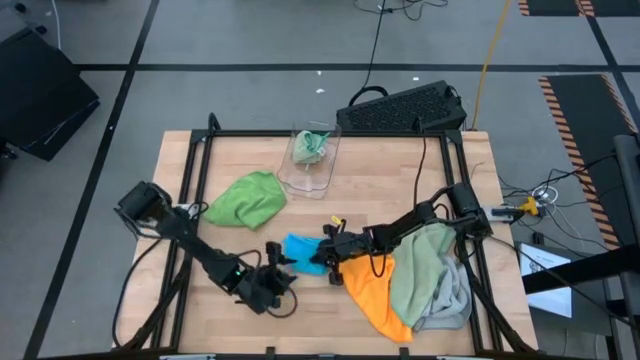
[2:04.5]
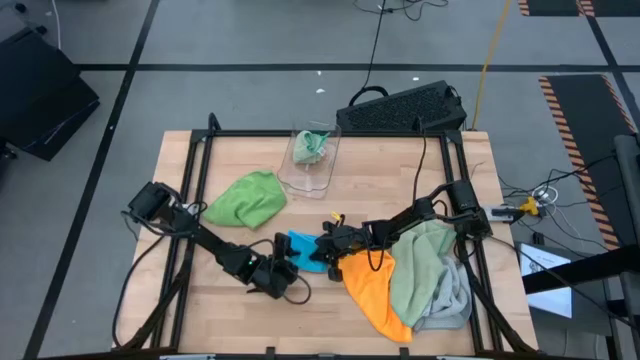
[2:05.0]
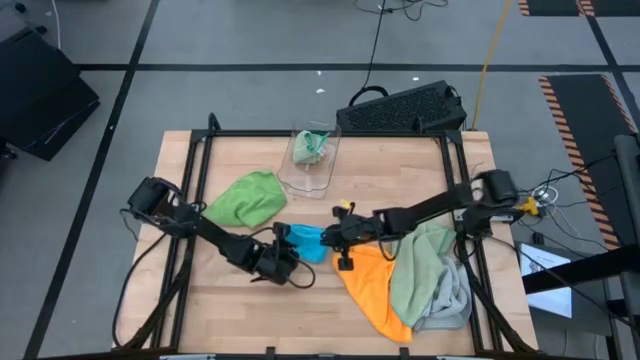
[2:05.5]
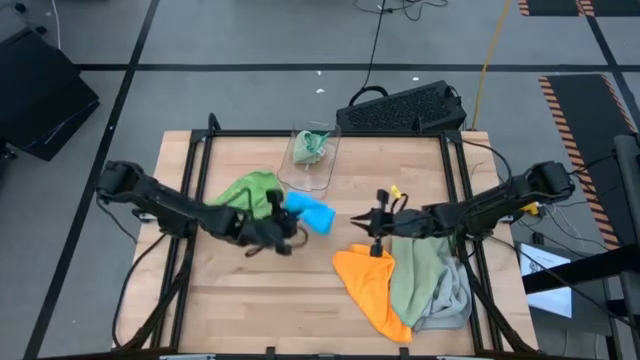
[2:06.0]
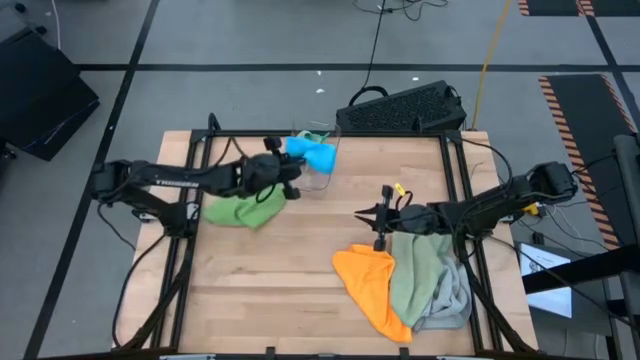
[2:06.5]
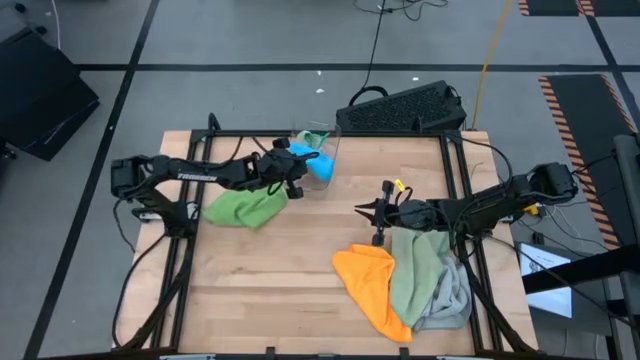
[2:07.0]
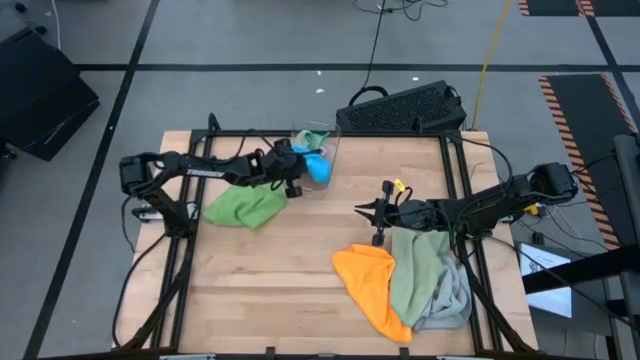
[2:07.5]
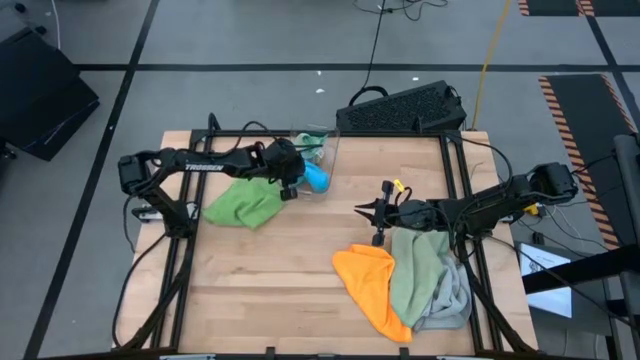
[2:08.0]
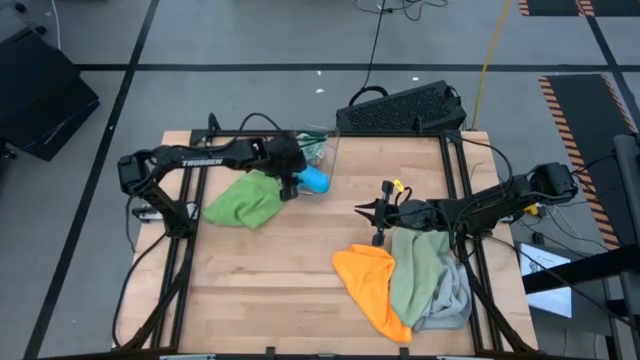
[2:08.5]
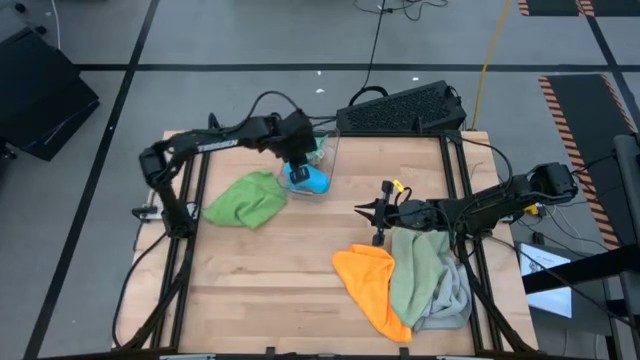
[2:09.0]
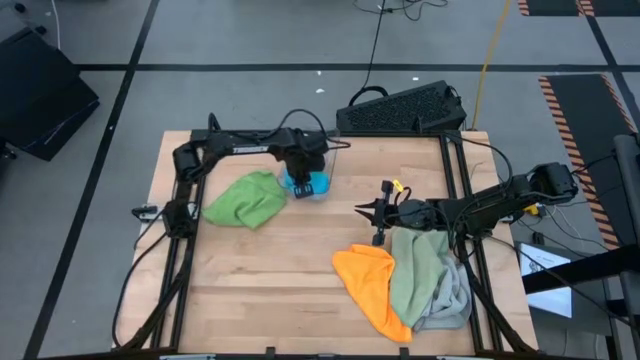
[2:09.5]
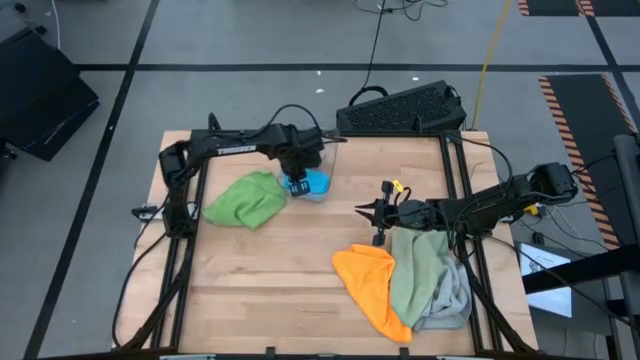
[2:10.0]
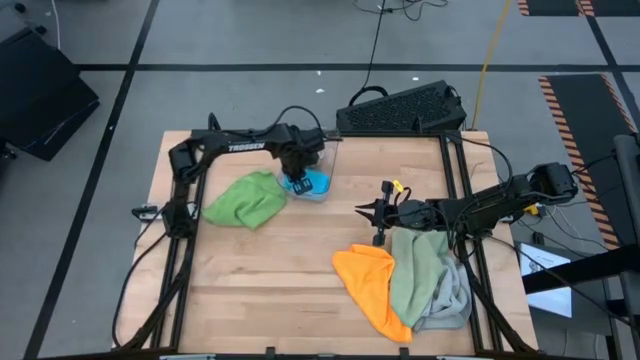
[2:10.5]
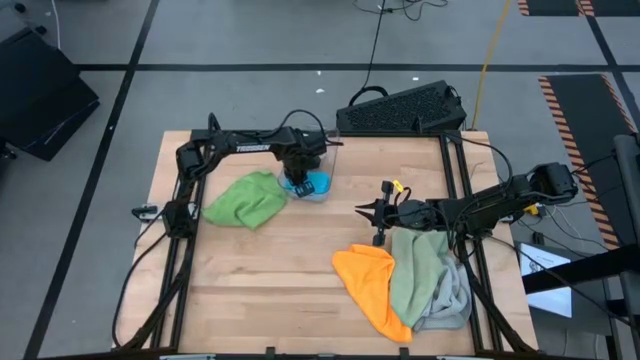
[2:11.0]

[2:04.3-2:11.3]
Task: Fold microfiber towels
Put the folded blue towel into the transparent bin

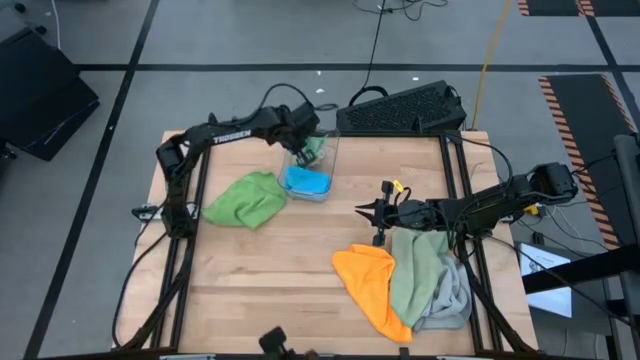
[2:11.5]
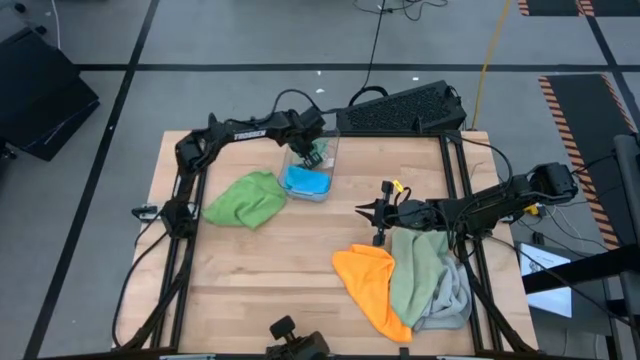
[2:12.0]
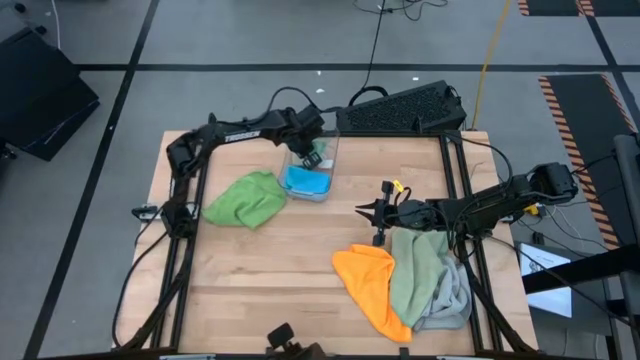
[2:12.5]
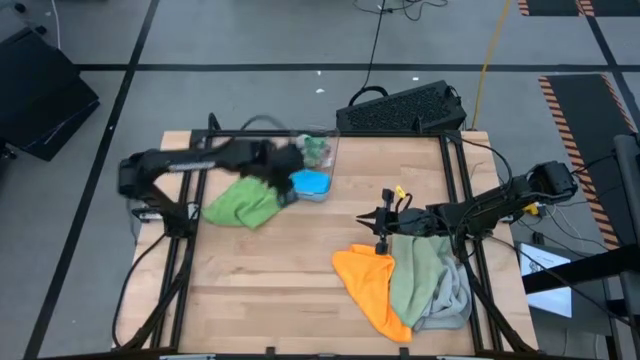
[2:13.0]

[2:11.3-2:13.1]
Adjust the light green towel into the transparent bin
